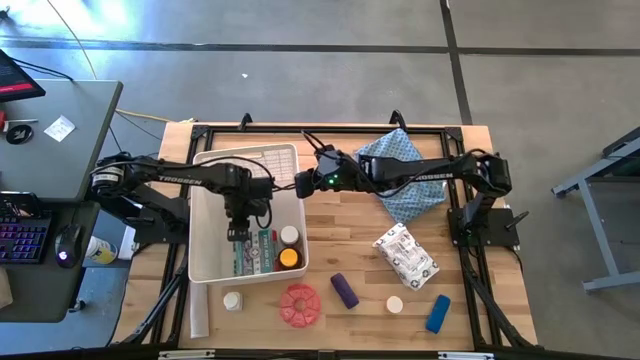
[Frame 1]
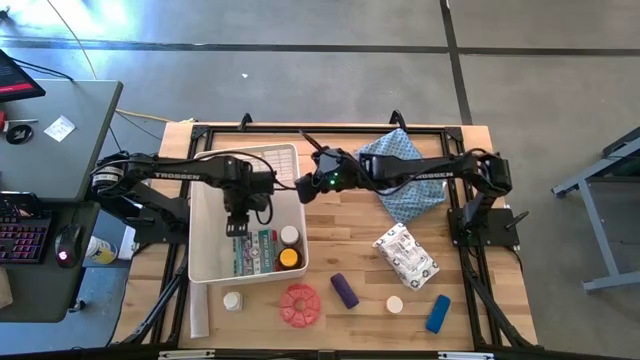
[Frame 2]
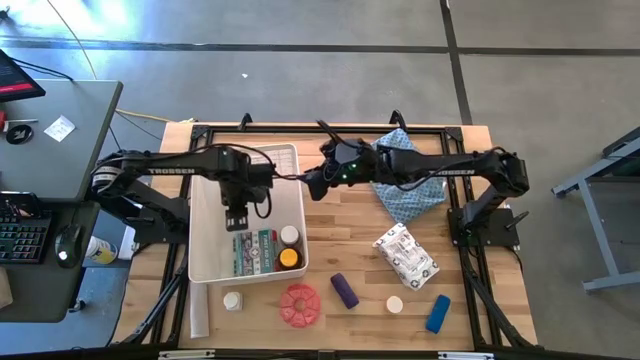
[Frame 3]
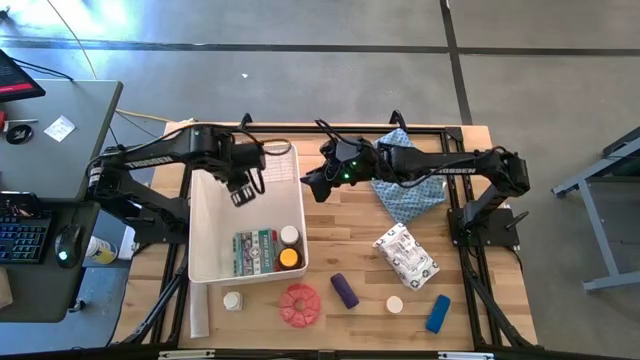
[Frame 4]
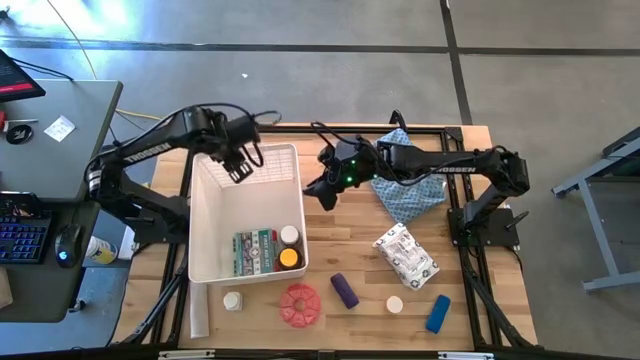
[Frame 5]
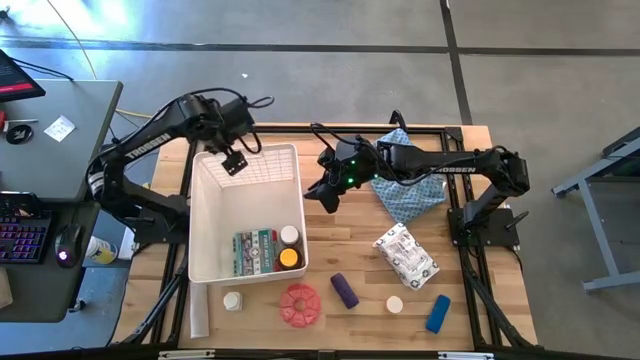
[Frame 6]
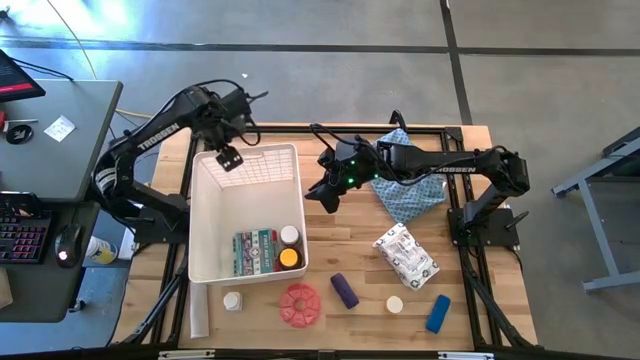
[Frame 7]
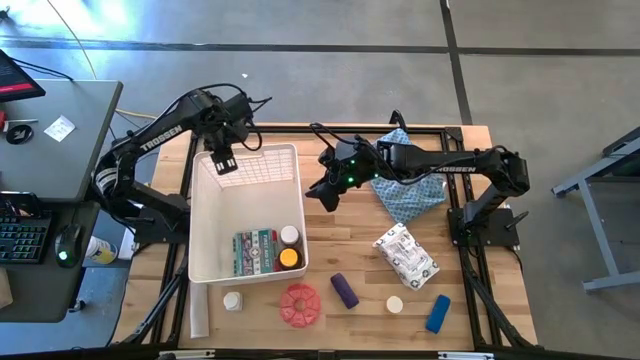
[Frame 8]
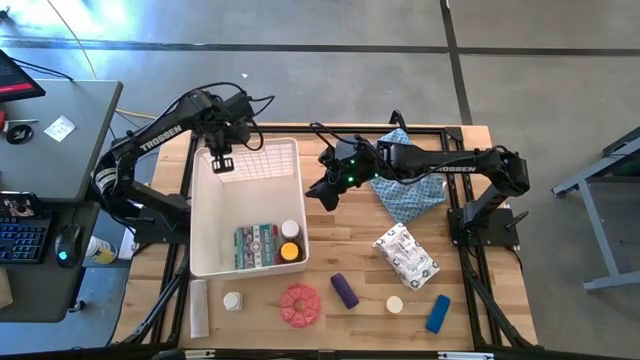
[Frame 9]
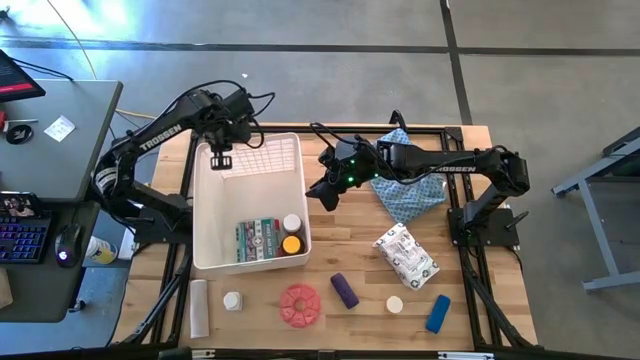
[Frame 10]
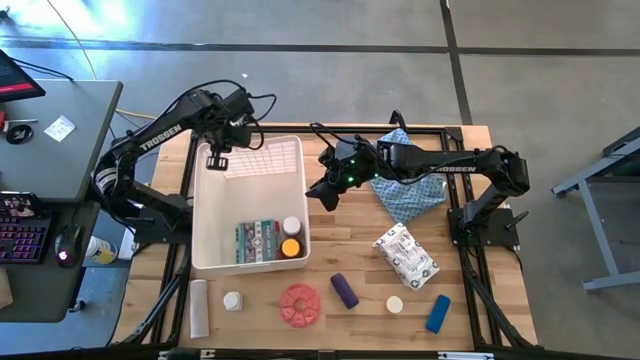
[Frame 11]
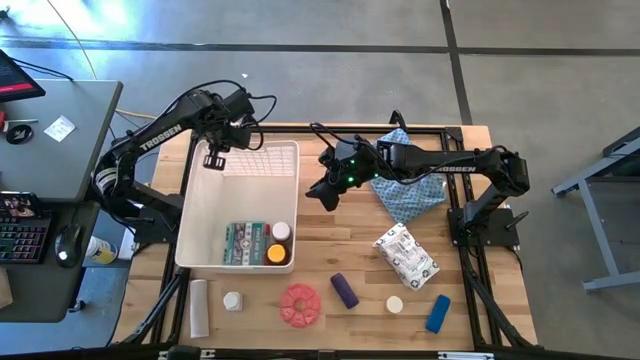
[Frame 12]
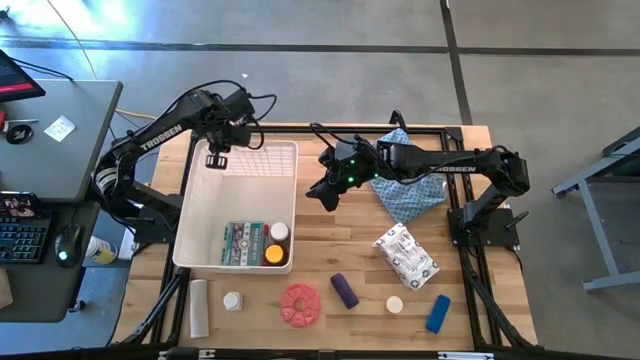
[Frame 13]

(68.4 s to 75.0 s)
Task: Pick & place medical supplies in basket/bin
Adjust the white bin

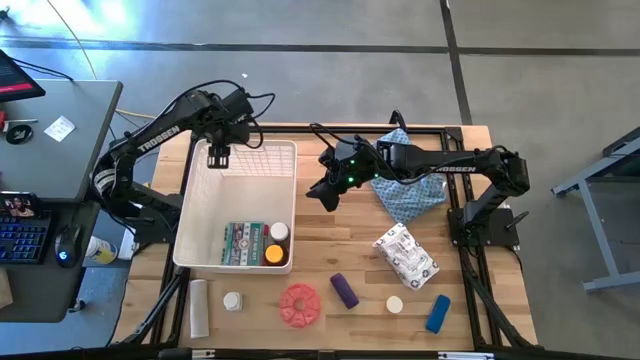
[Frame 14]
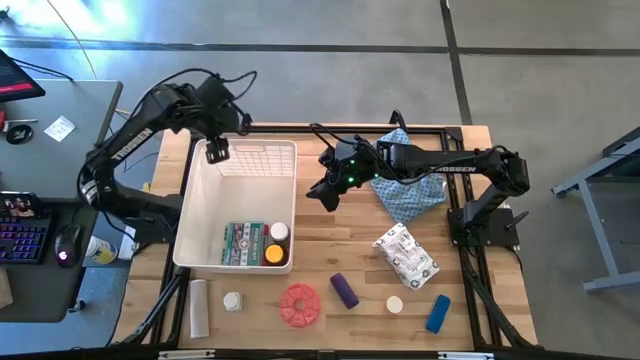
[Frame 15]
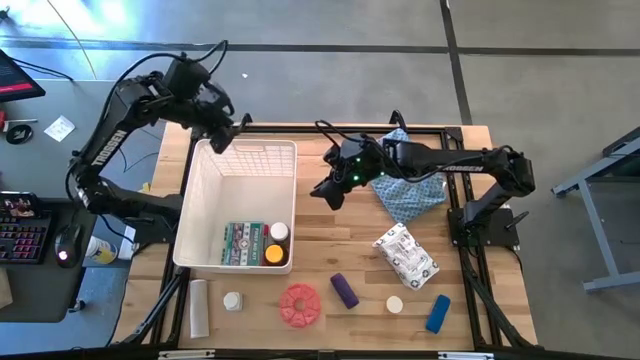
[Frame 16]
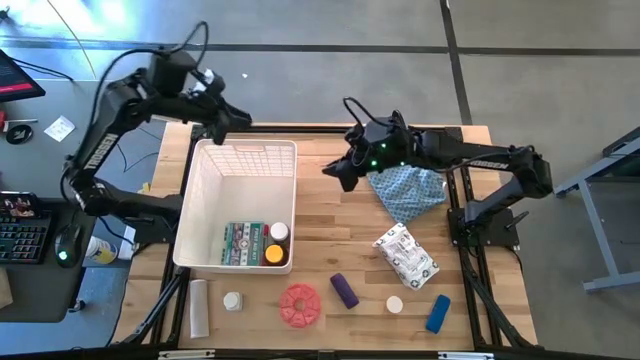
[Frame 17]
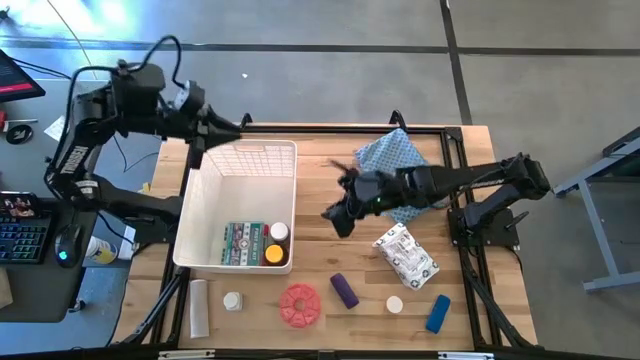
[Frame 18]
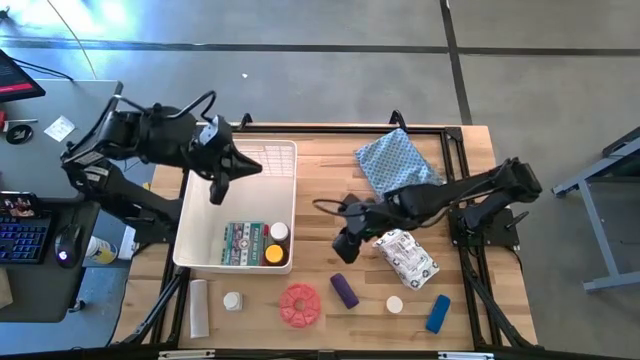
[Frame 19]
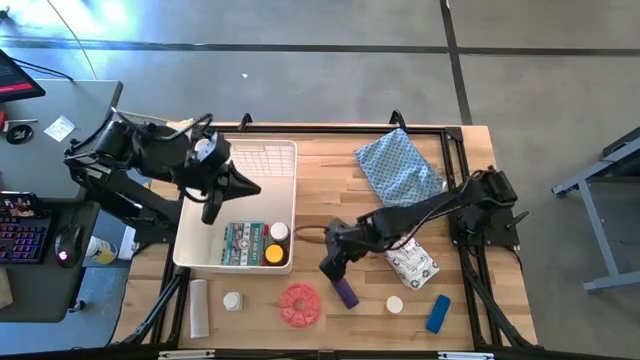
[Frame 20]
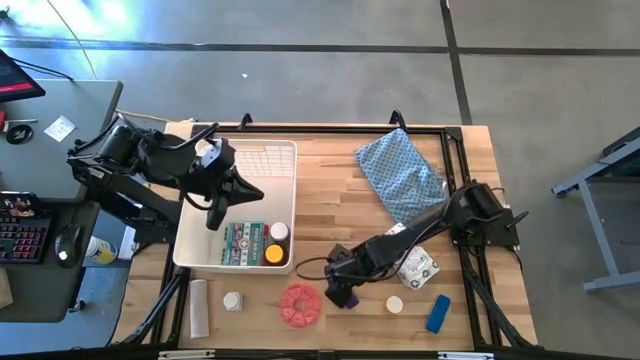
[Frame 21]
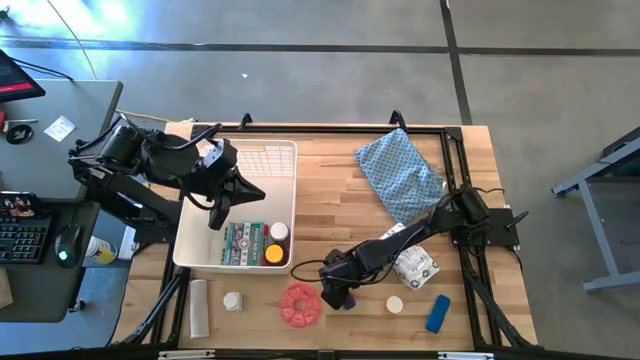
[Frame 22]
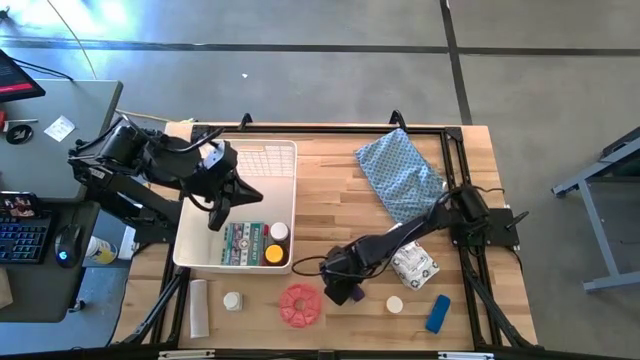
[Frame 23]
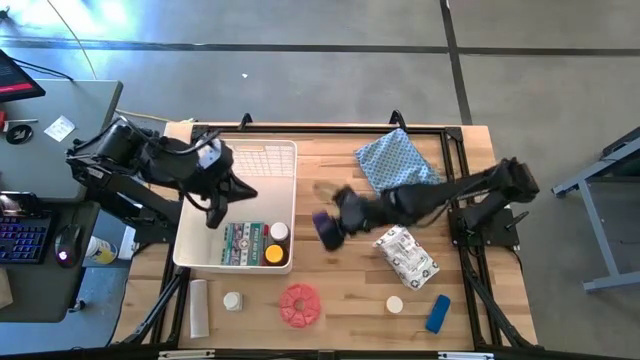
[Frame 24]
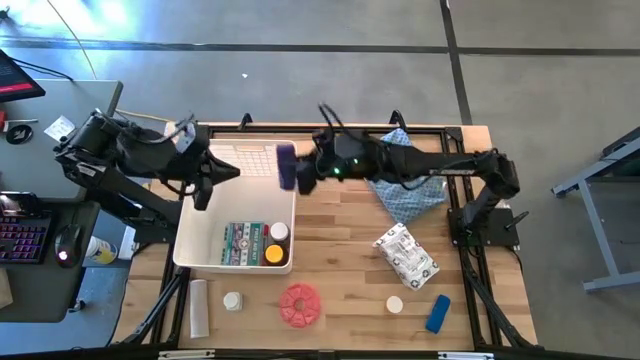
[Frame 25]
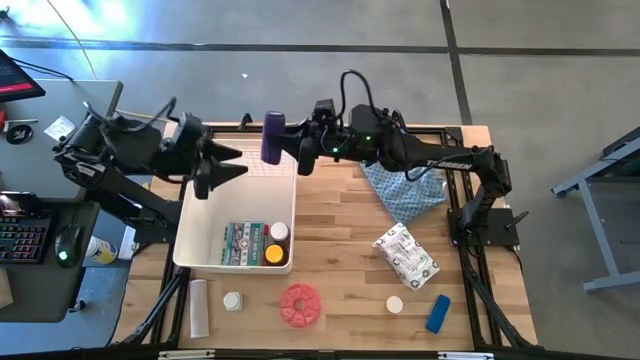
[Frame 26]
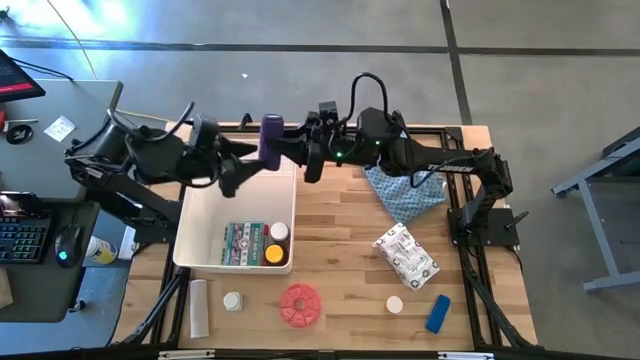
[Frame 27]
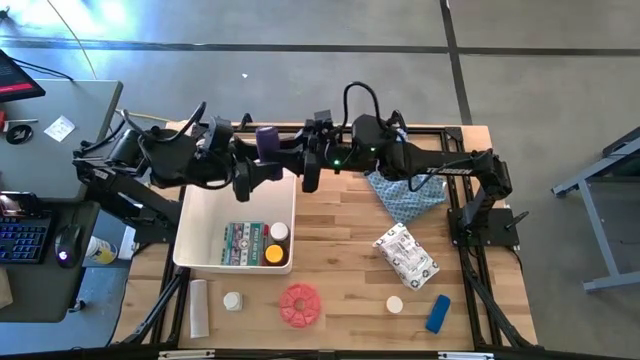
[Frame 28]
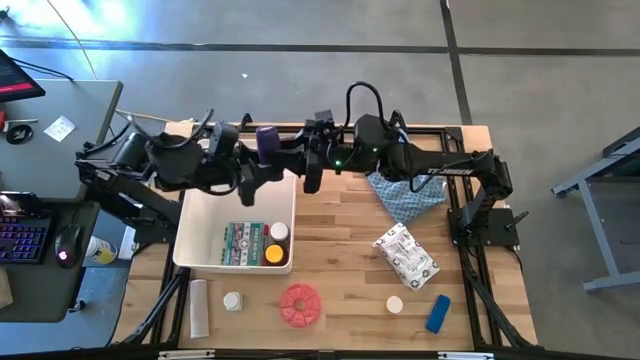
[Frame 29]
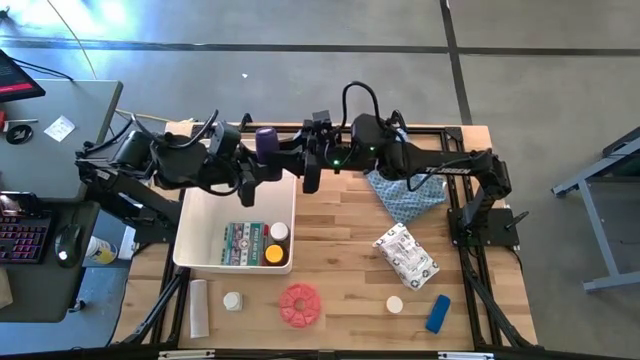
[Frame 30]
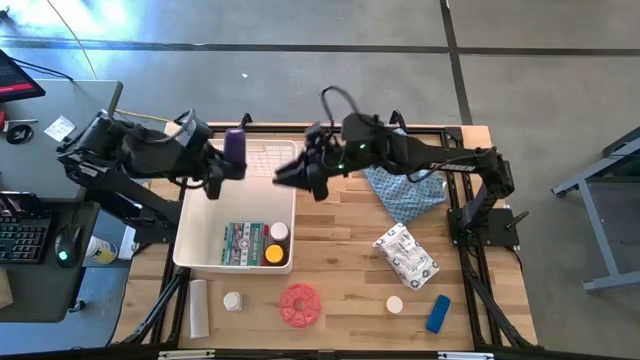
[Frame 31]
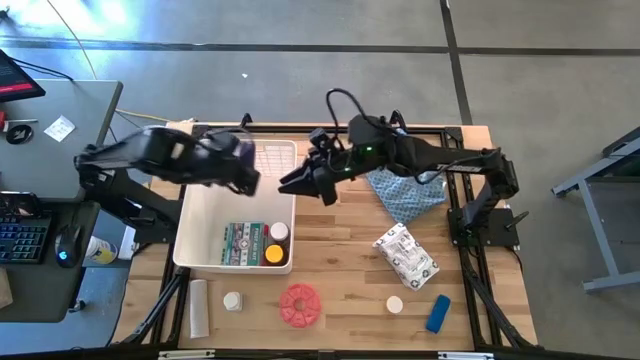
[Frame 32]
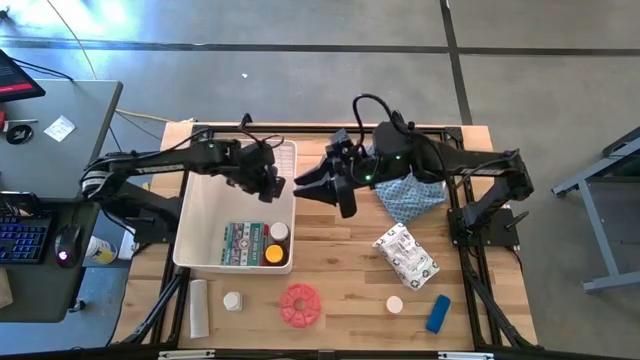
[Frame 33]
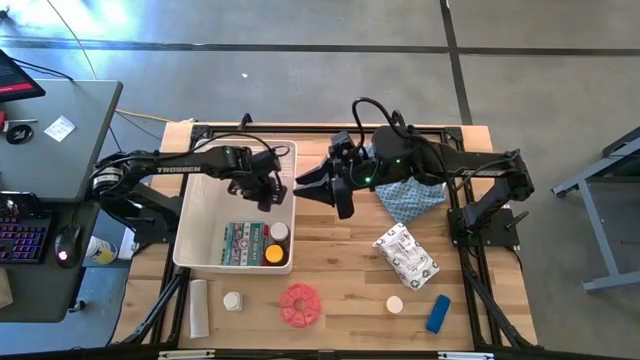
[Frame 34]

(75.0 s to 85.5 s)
Put the violet rolled gauze into the white bin

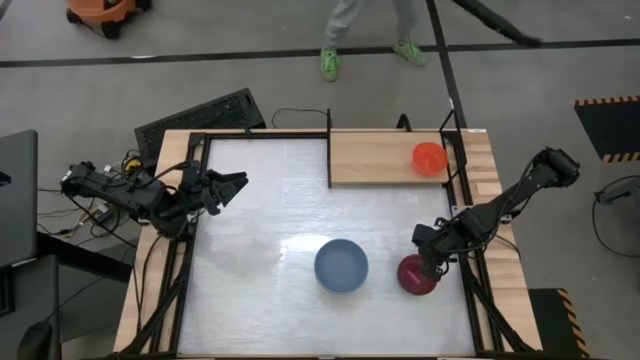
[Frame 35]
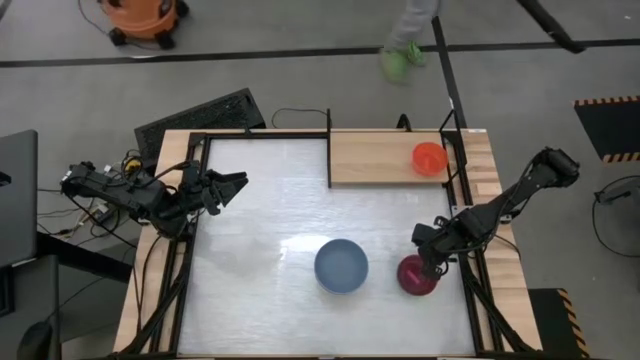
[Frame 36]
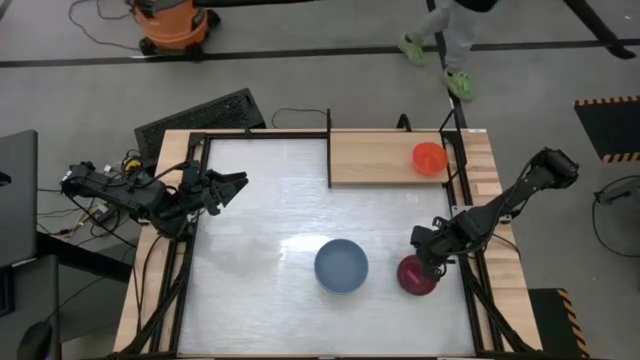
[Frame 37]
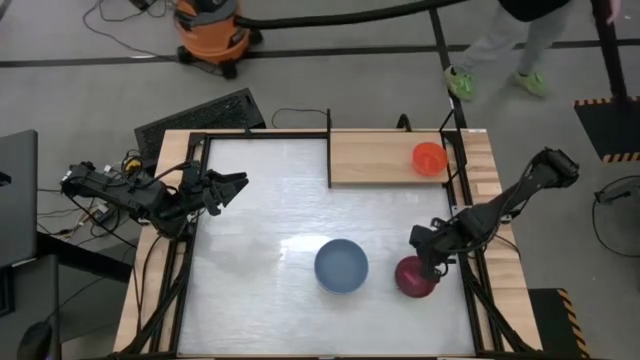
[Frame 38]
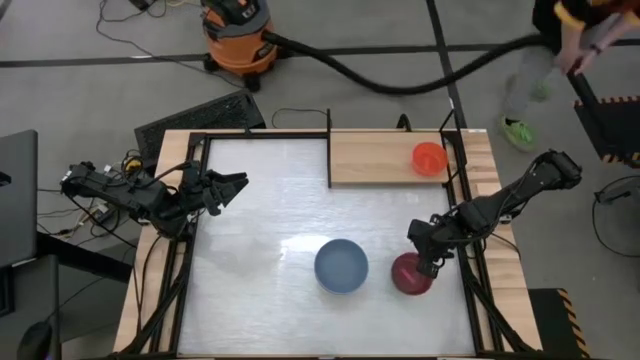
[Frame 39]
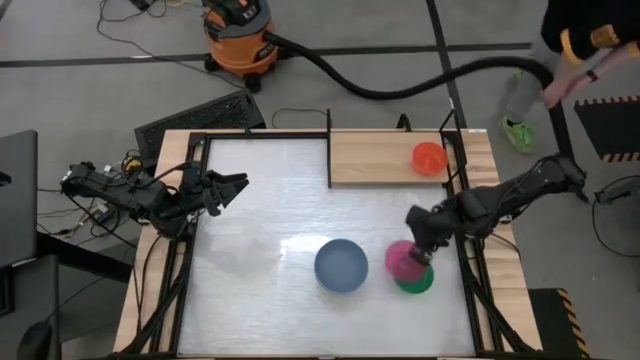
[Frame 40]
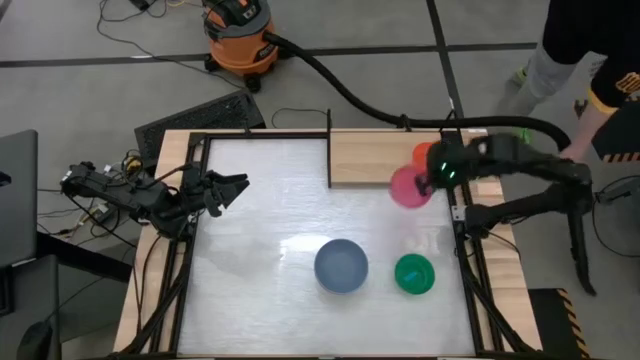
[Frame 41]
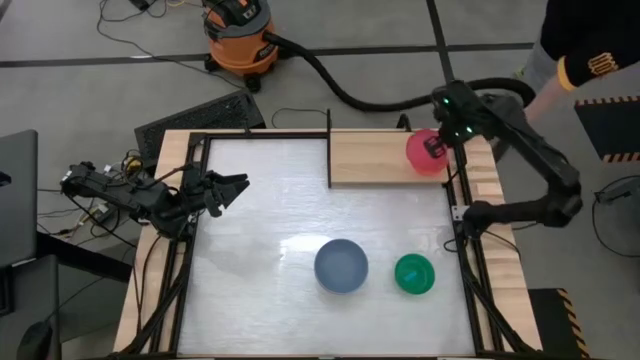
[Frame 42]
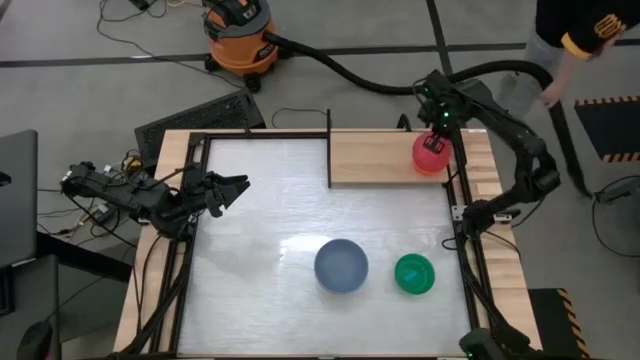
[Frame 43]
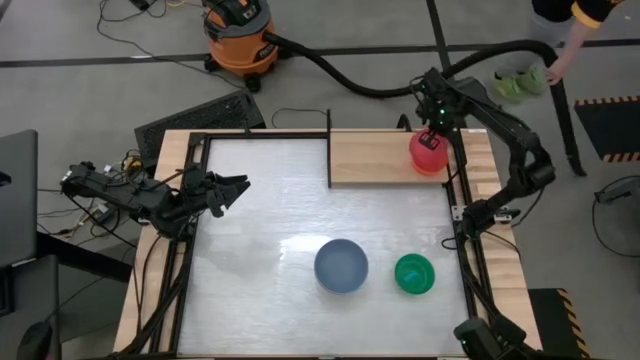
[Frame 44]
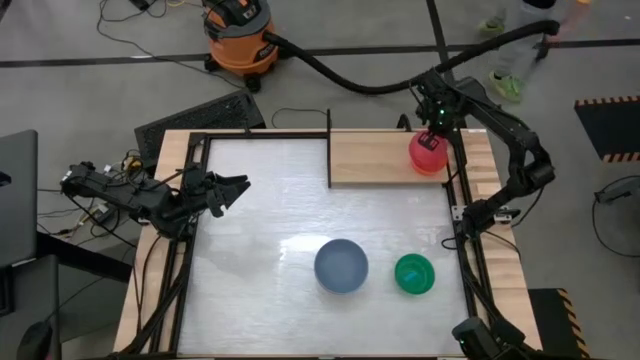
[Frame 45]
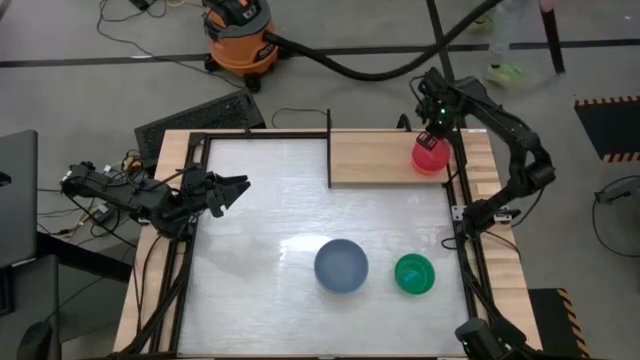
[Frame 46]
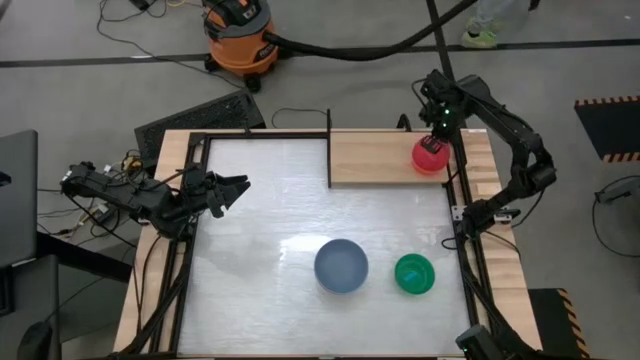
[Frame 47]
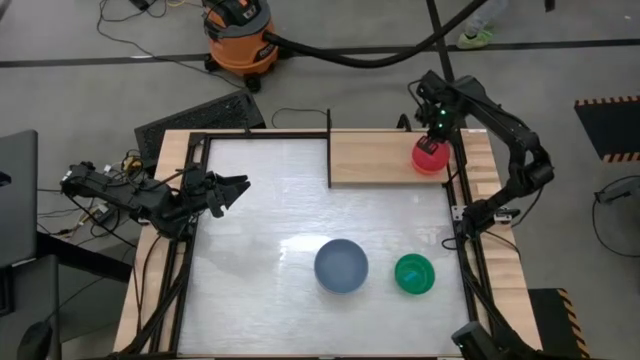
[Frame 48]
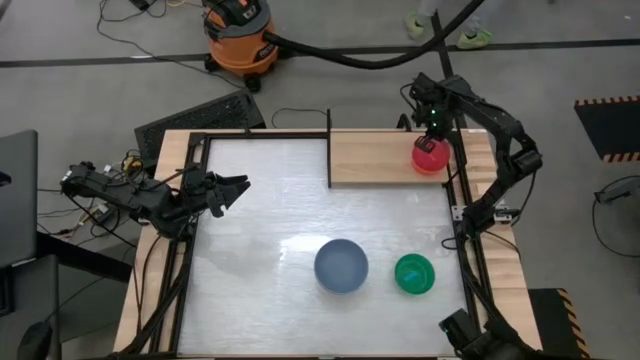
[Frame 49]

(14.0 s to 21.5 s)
Task: Place and stack bowls onto a shelf
Stack the pink transparent bowl on top of the orange transparent bowl on the shelf
